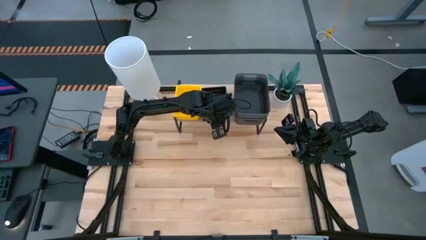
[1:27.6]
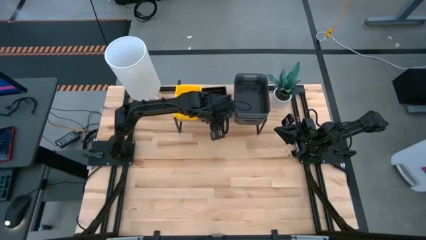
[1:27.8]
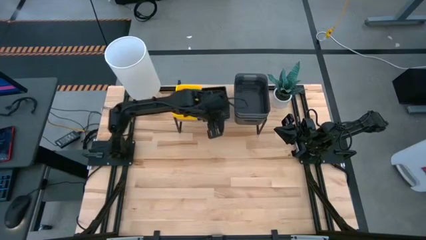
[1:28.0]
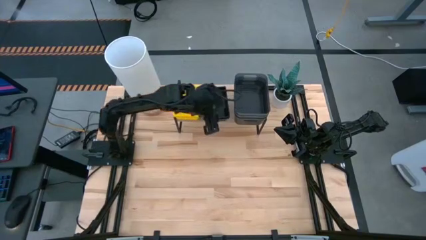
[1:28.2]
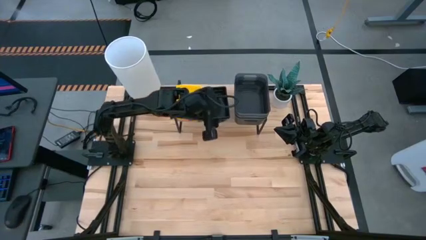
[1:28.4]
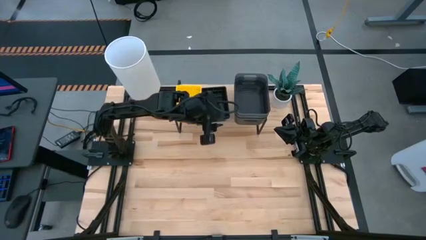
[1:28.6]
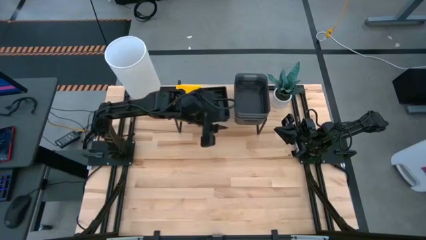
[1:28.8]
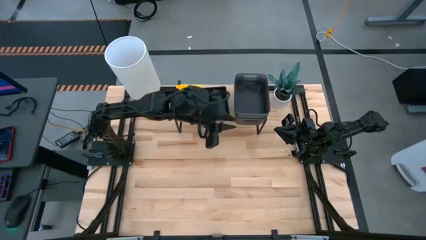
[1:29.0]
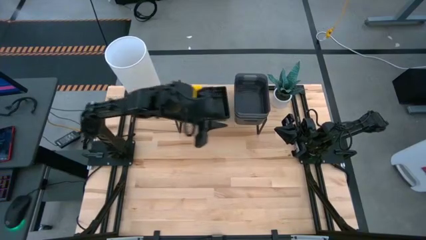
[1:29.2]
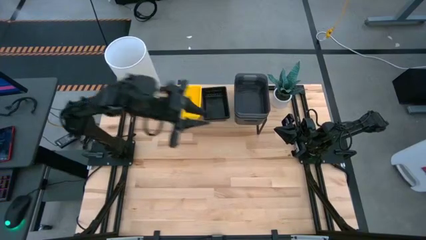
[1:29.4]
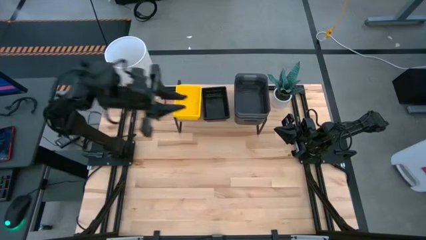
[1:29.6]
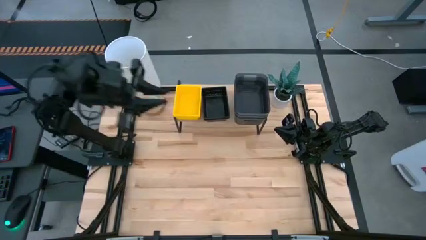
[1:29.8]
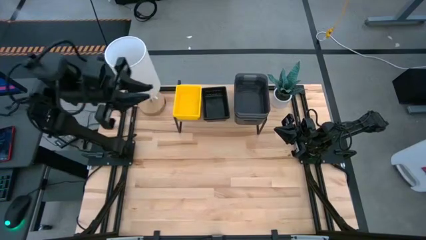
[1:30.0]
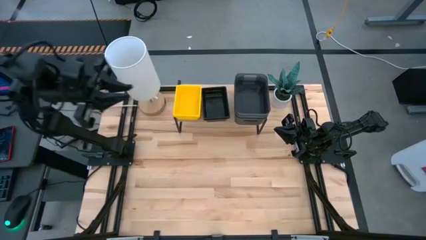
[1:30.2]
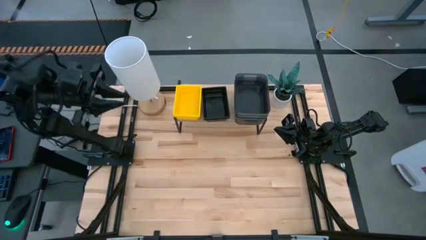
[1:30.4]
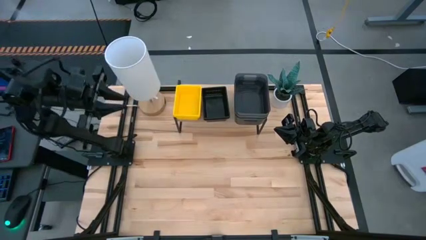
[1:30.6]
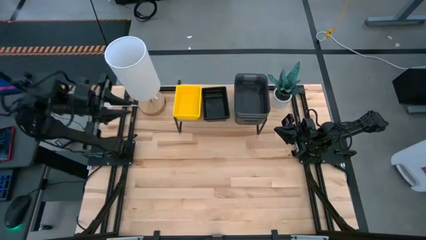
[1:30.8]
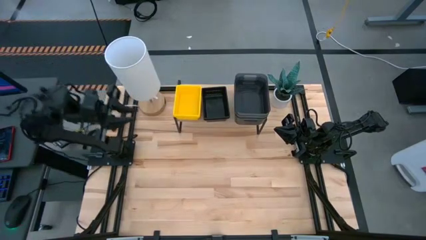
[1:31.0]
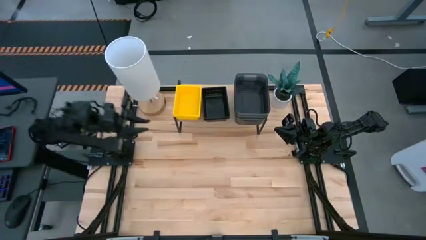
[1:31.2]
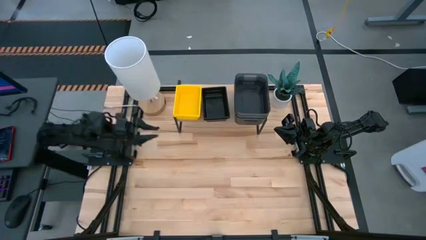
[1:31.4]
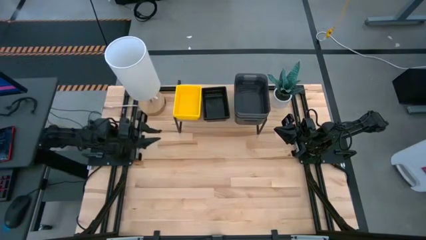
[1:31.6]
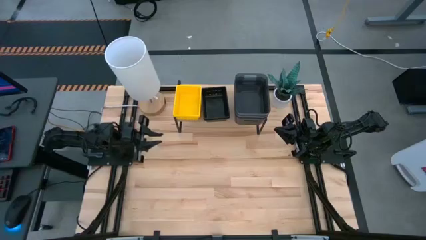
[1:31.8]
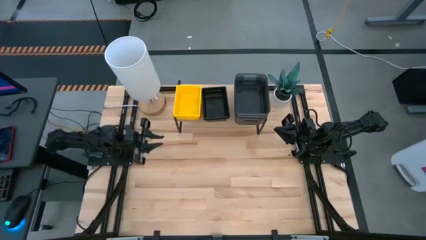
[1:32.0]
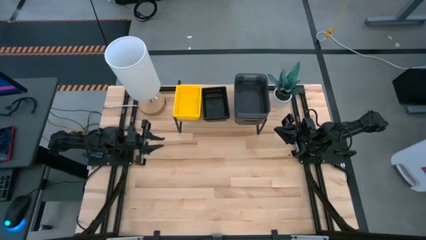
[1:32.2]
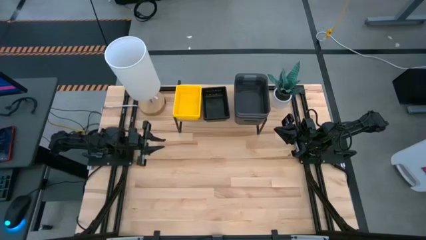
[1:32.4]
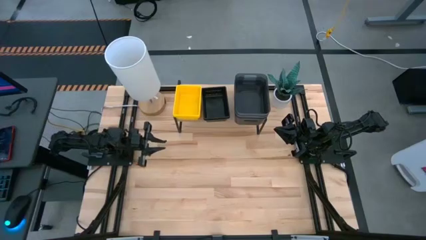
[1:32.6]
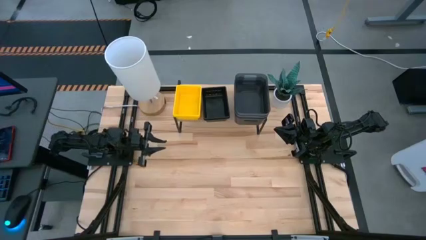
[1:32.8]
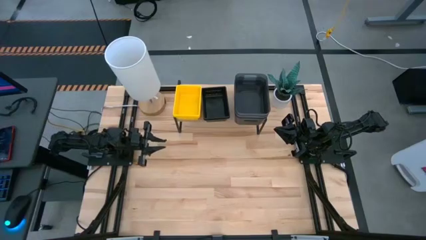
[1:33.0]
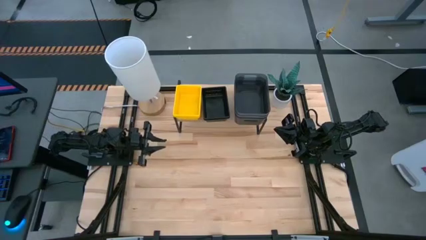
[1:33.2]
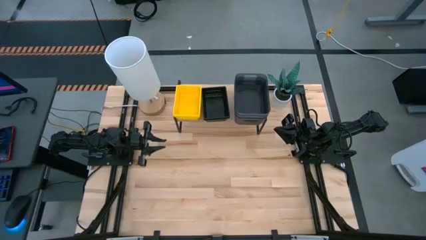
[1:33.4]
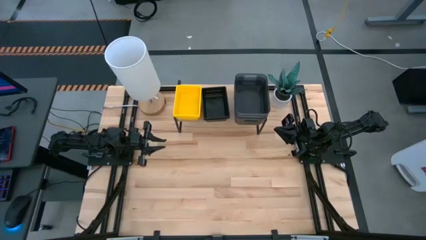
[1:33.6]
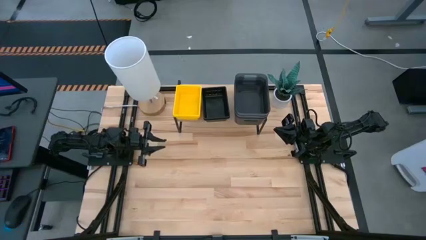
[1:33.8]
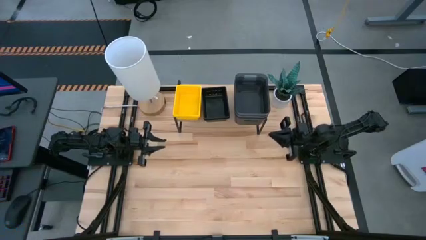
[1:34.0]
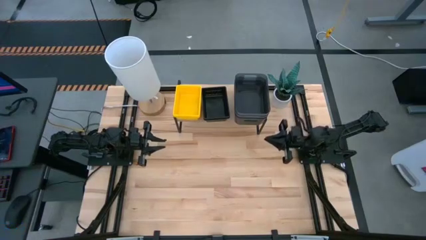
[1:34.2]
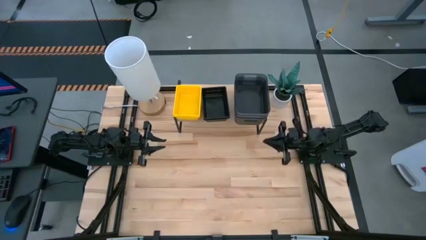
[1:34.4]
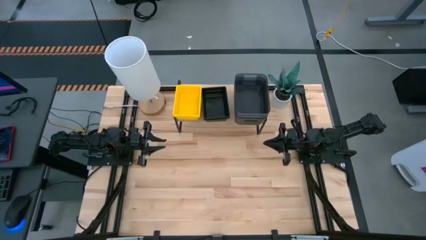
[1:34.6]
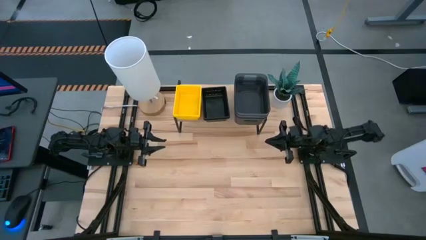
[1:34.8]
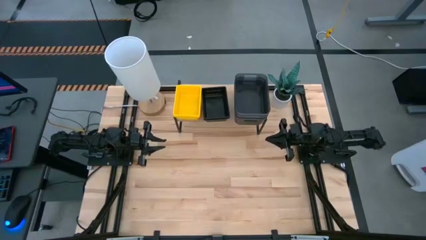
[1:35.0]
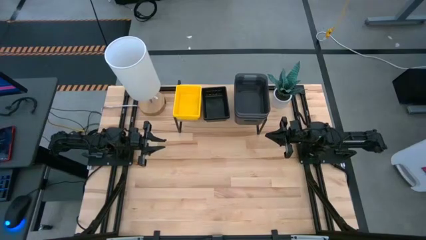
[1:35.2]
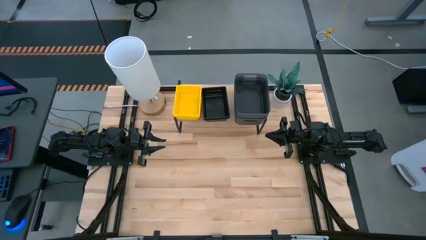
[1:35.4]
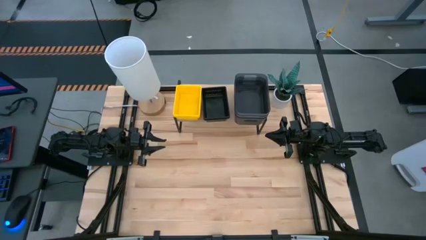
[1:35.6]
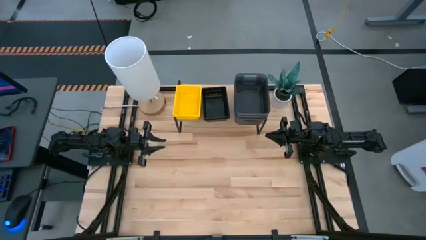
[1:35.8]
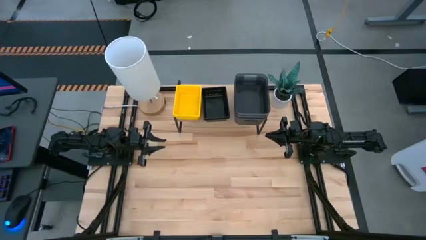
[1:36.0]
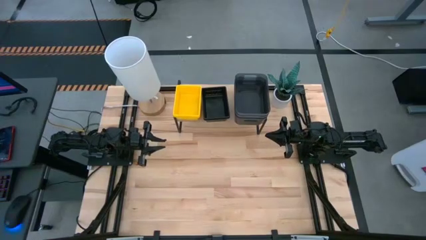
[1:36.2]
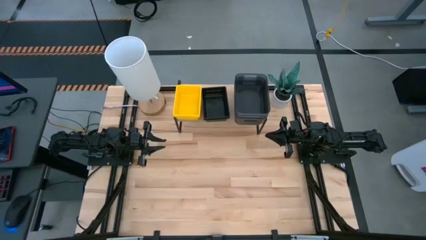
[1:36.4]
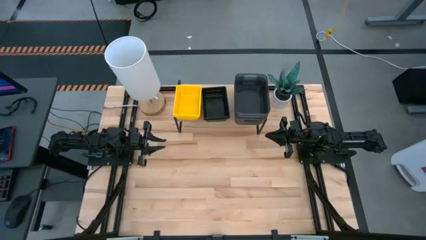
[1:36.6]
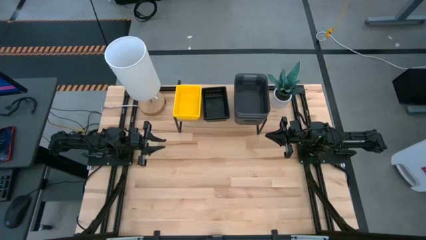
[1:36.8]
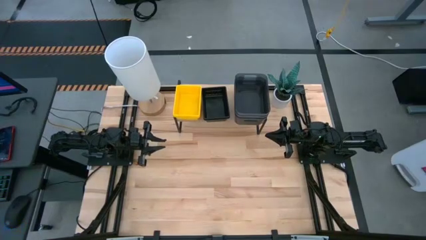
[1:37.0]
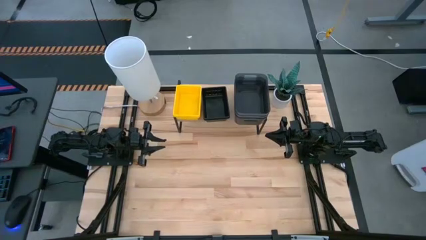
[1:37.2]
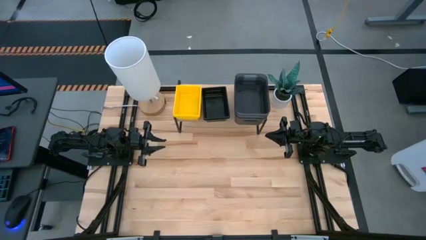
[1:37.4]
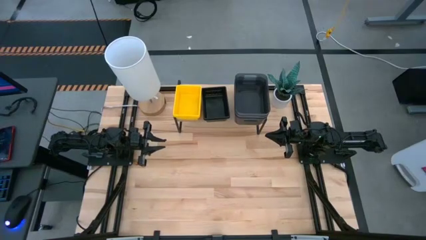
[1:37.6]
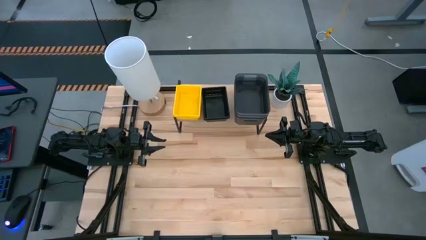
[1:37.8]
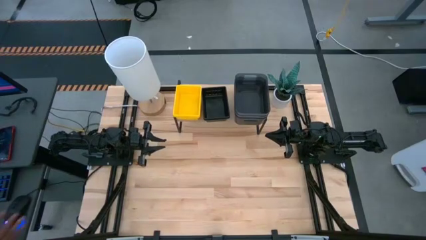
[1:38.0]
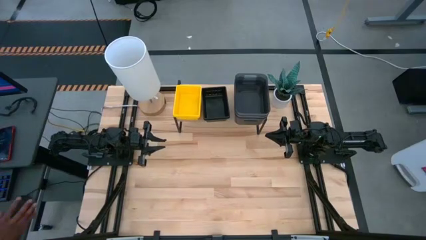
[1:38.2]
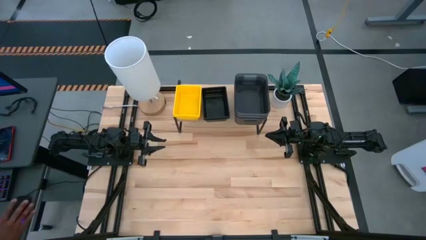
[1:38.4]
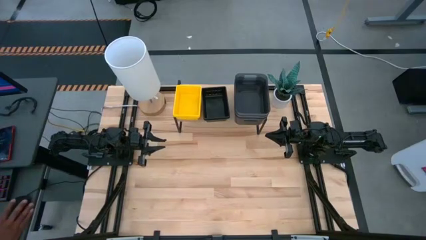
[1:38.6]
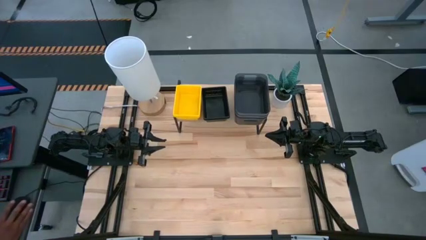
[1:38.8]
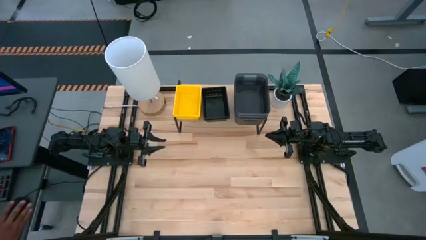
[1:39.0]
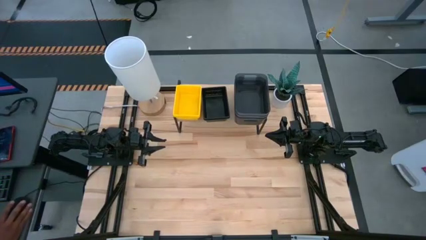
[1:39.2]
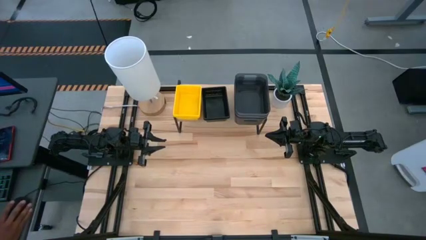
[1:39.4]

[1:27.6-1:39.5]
Task: Stack baskets on shelf by color
Return to Home Position

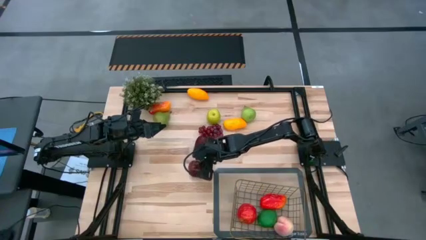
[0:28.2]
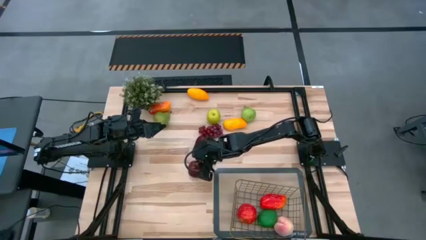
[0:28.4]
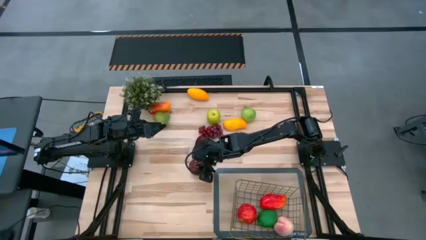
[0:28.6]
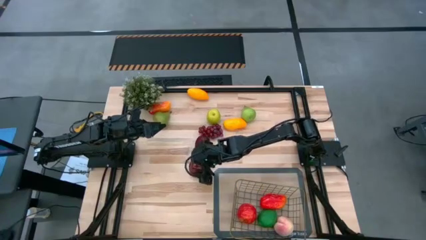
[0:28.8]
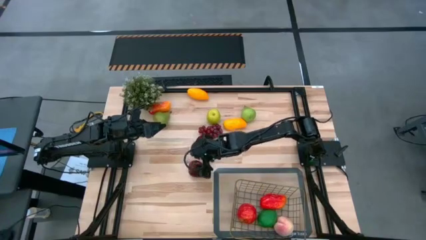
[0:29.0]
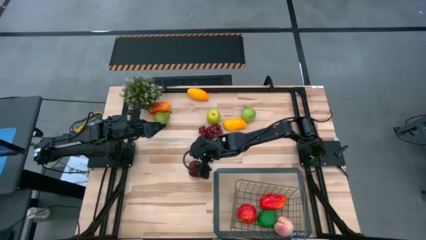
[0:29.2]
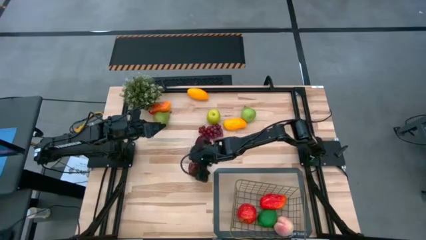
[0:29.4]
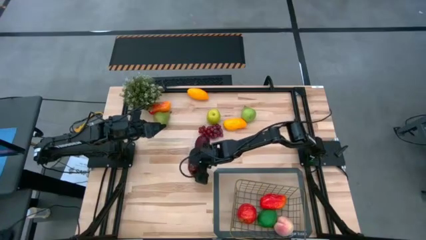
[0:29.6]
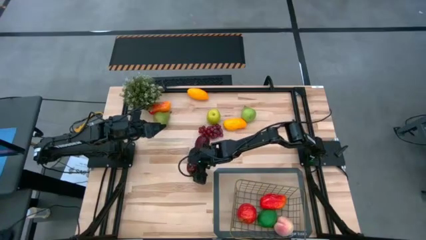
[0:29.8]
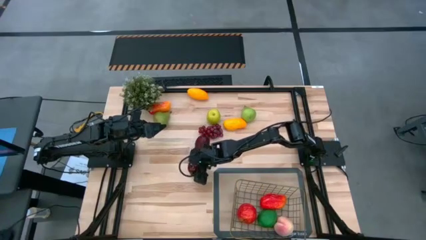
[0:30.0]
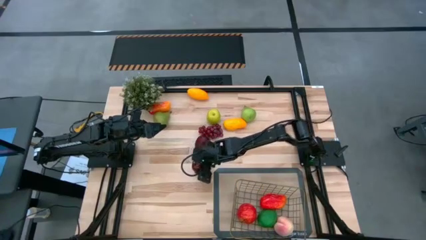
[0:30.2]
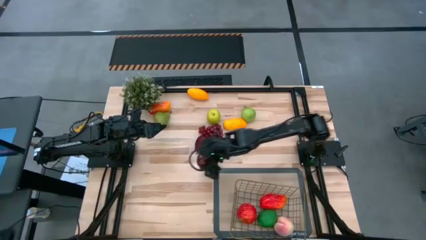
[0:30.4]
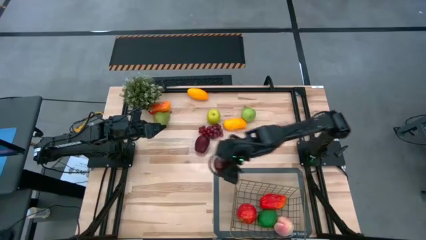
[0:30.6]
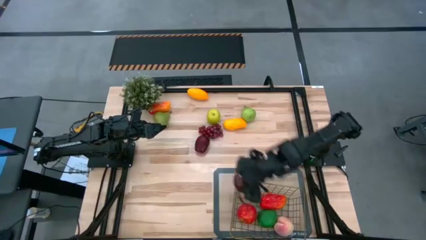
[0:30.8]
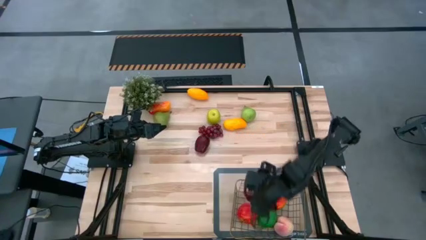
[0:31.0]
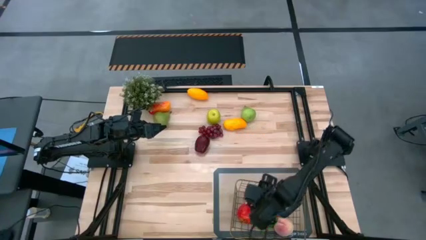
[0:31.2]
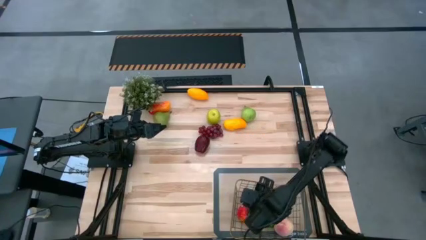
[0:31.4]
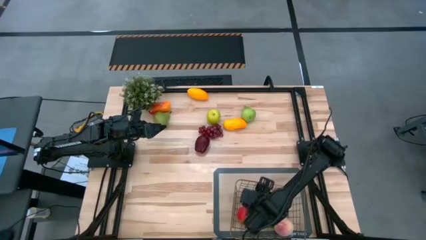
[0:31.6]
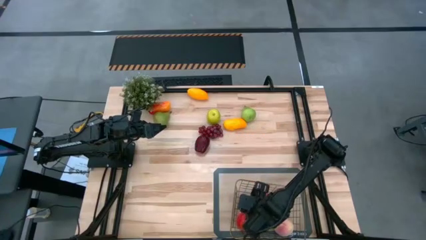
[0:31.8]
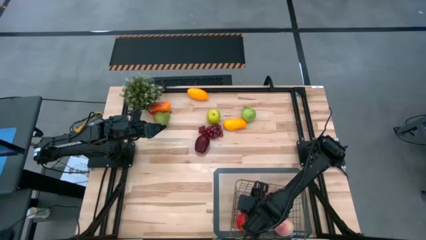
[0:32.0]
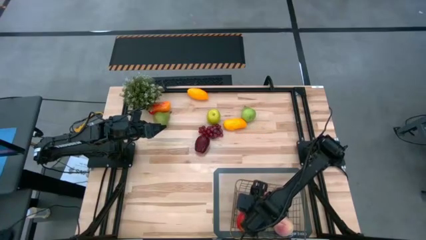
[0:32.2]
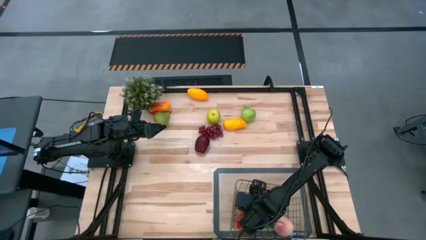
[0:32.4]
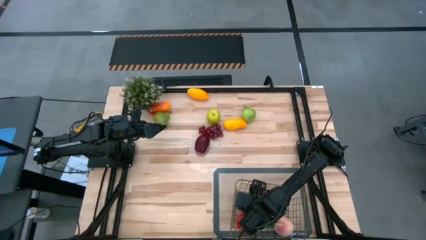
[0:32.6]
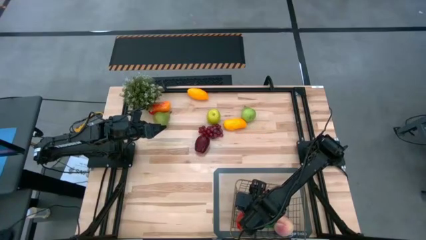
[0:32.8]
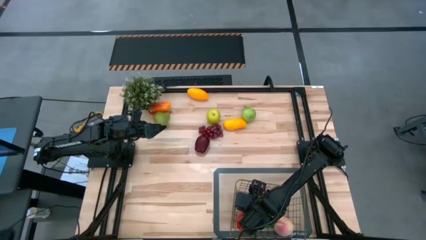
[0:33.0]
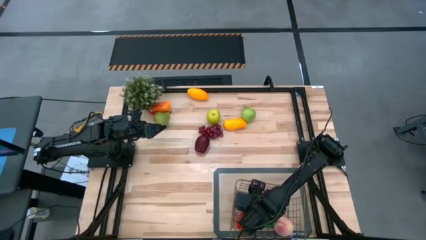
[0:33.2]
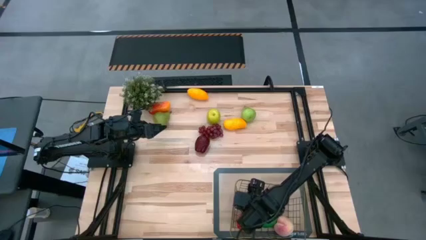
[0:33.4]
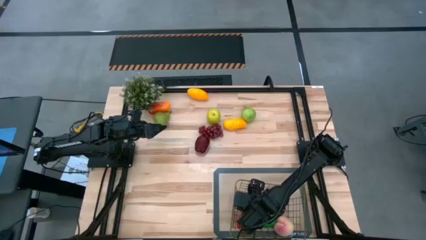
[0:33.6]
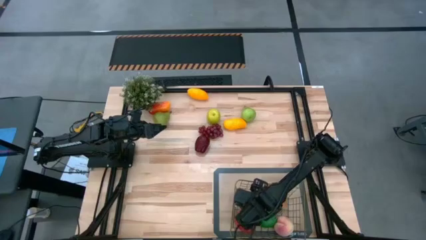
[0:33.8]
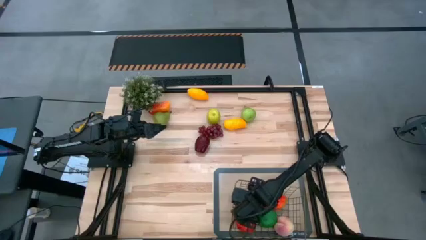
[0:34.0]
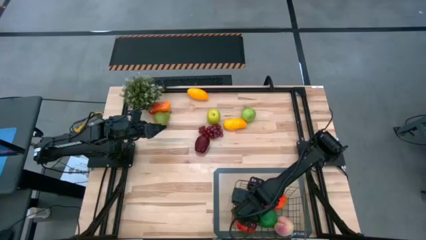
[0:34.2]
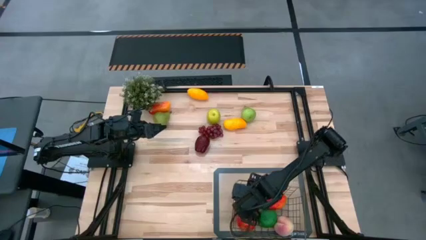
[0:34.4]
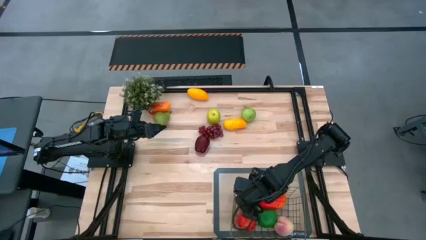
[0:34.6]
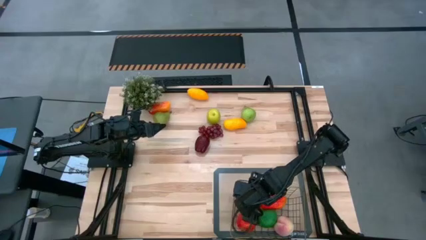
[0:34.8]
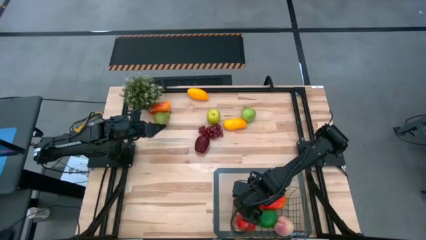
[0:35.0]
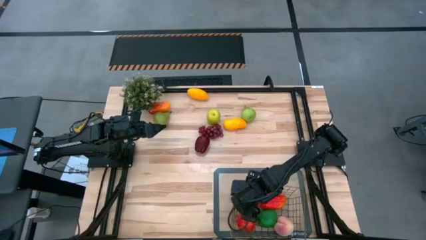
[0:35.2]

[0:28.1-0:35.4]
Task: Build produce basket
Put the bottom dark red apple into the wire basket
